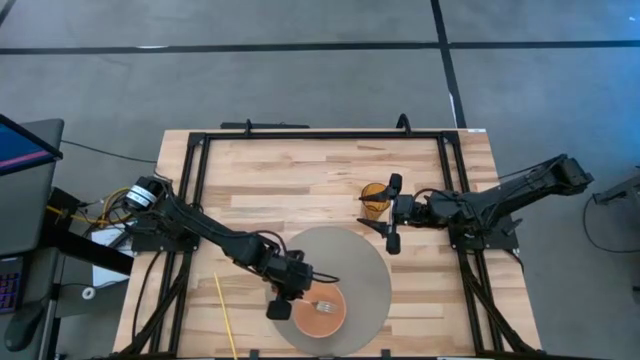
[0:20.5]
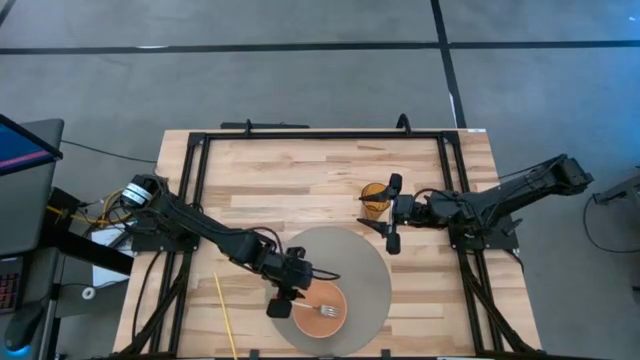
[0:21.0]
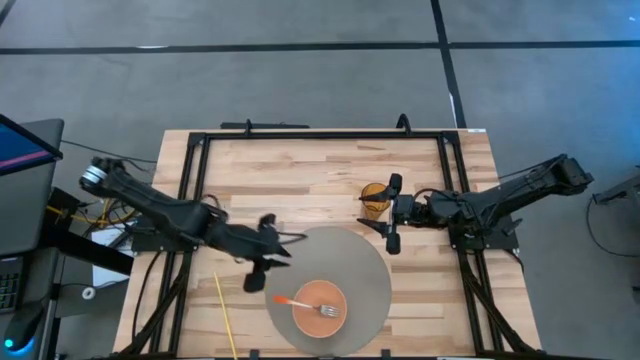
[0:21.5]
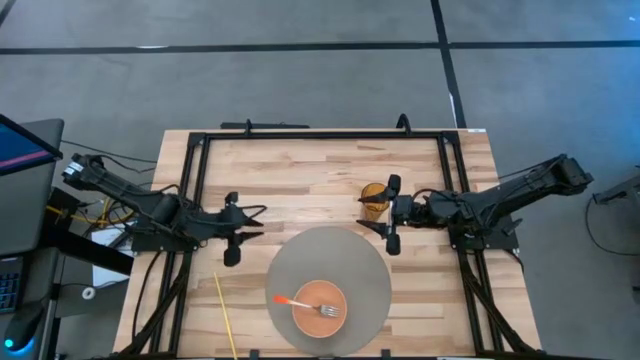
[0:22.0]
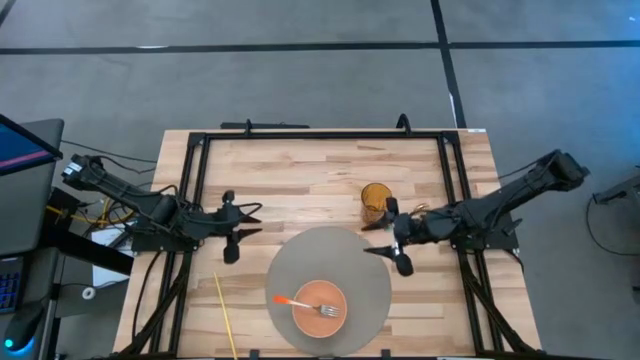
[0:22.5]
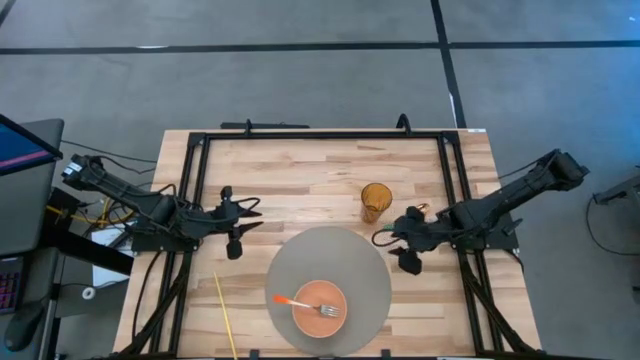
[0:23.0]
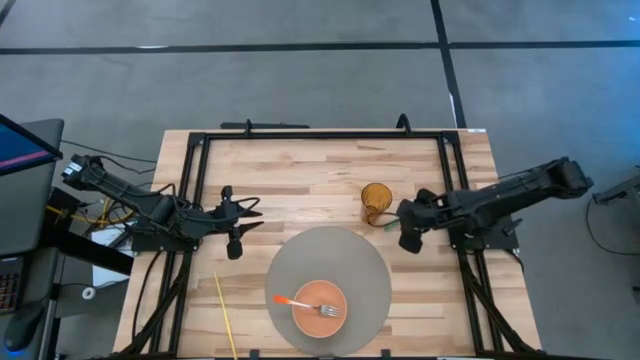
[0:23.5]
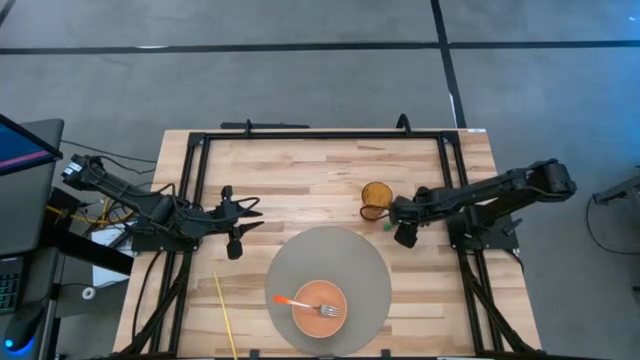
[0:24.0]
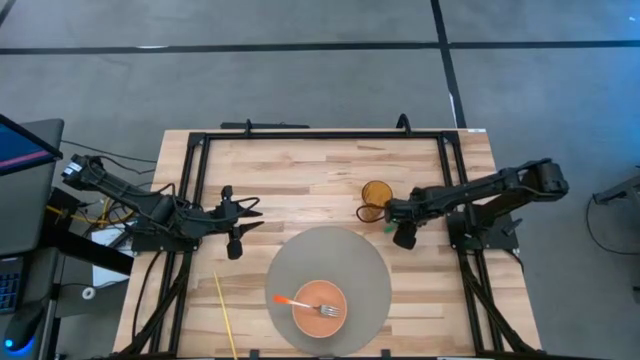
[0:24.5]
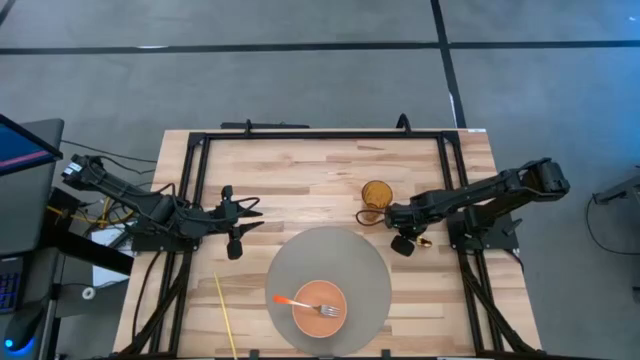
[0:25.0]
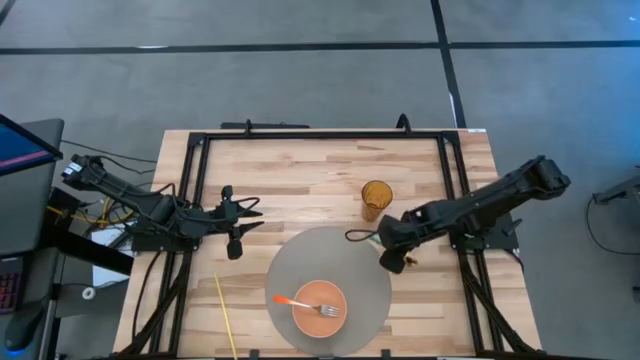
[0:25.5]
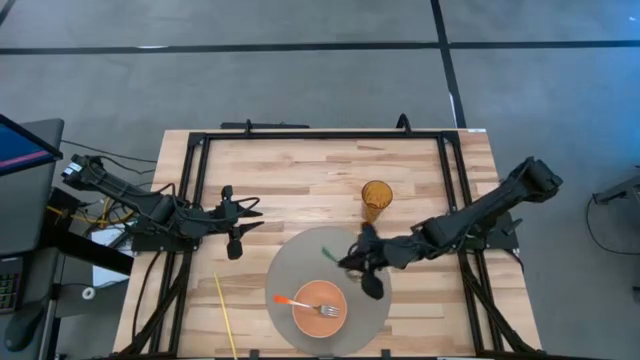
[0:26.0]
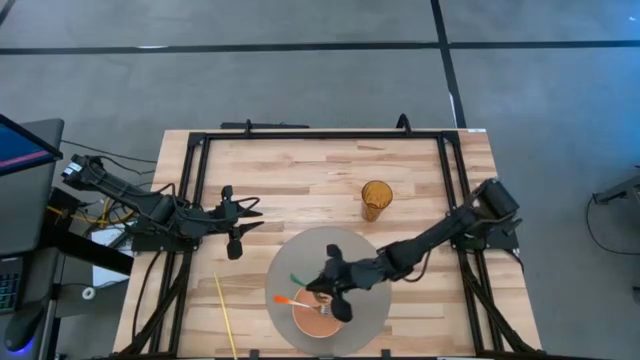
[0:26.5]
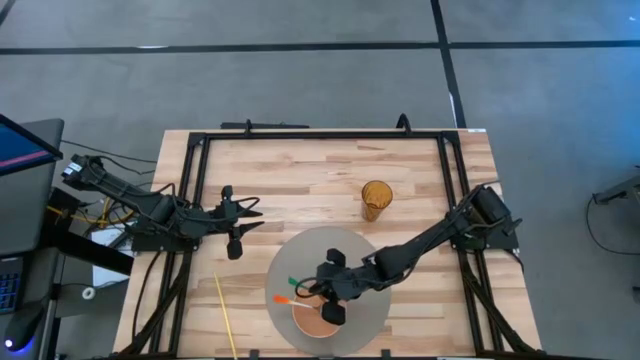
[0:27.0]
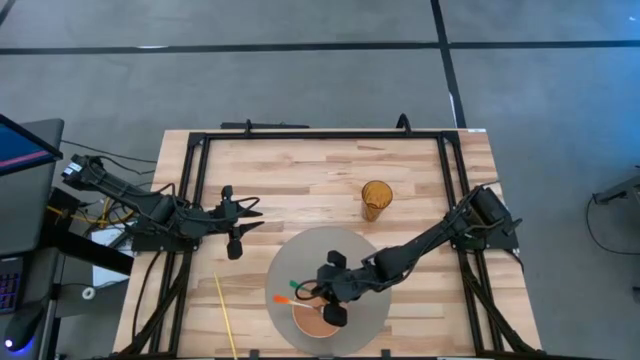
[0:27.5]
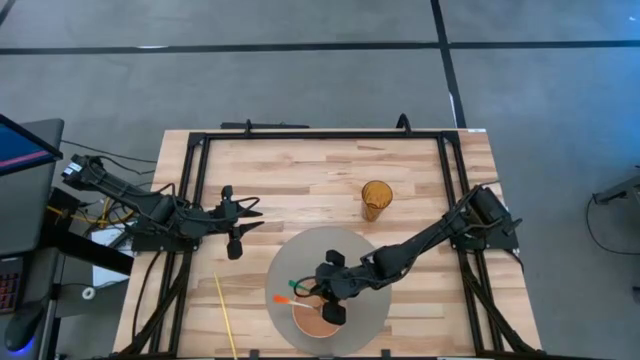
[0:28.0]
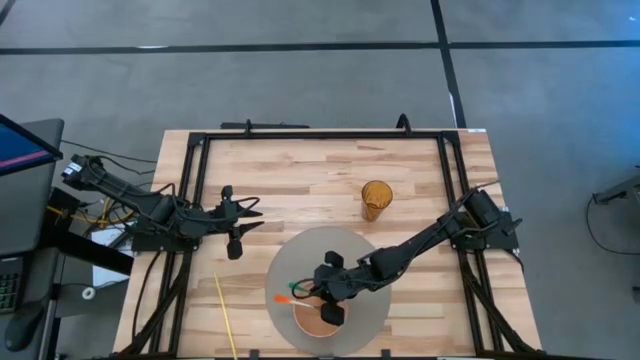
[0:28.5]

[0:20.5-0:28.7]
Task: Pick & Place Utensil
Put the green spoon into the orange bowl

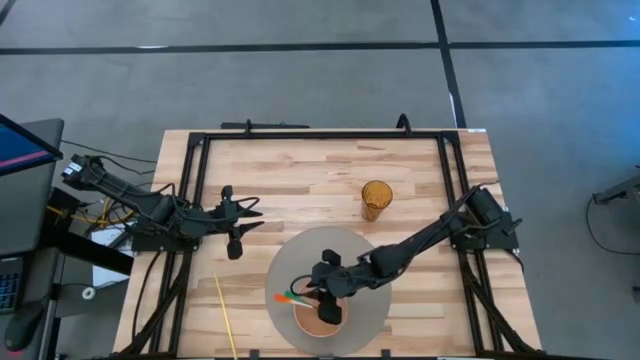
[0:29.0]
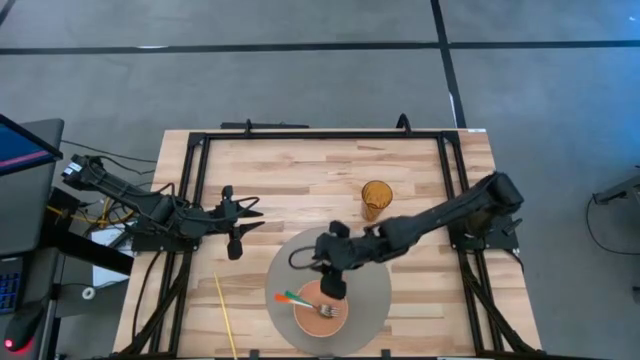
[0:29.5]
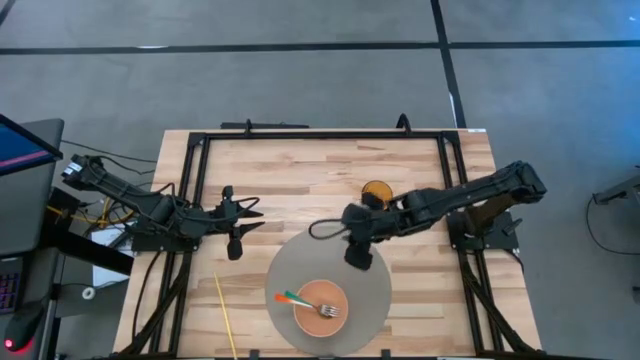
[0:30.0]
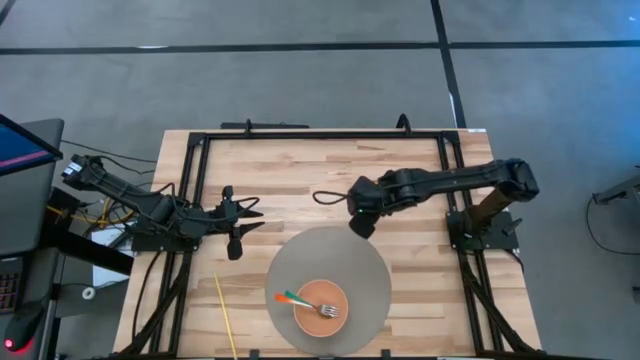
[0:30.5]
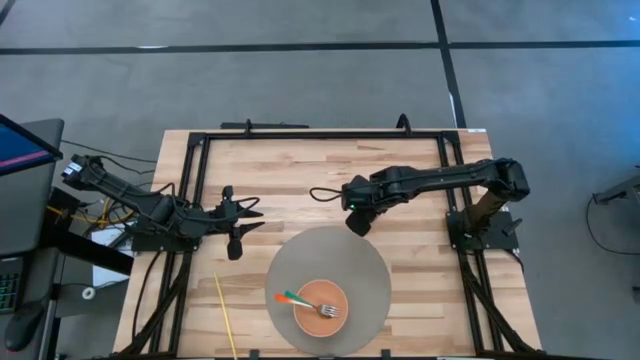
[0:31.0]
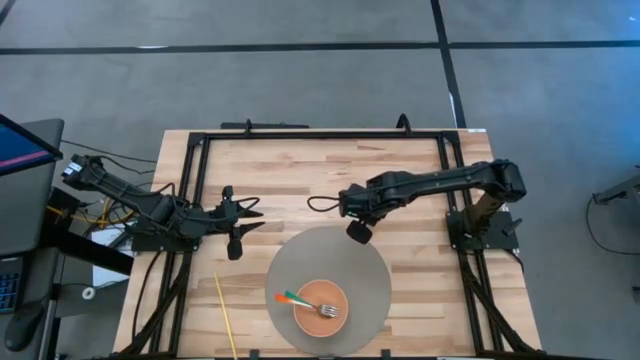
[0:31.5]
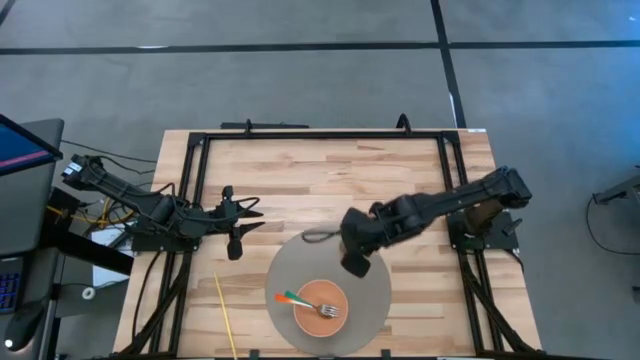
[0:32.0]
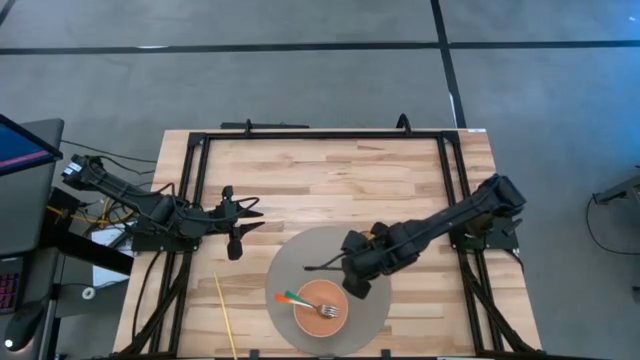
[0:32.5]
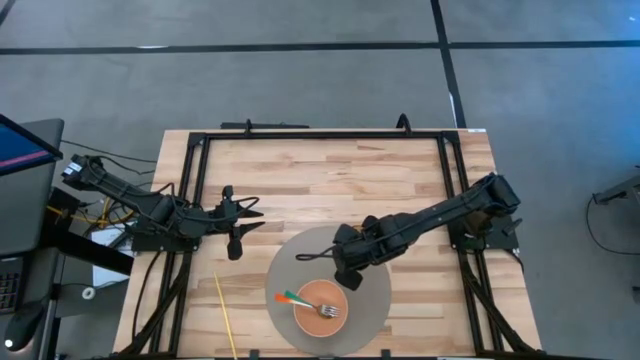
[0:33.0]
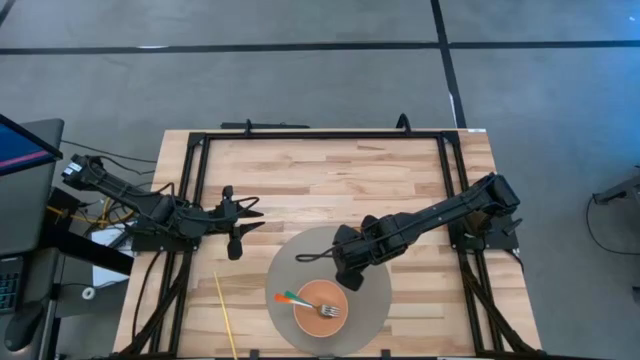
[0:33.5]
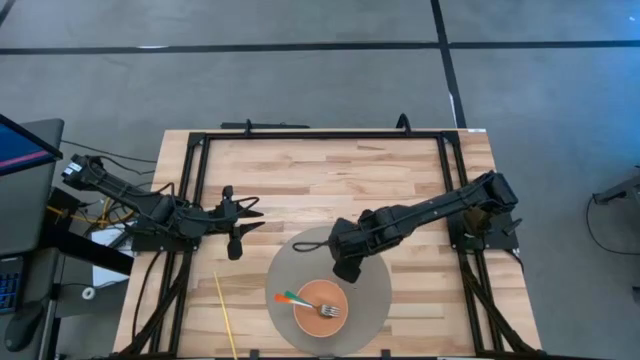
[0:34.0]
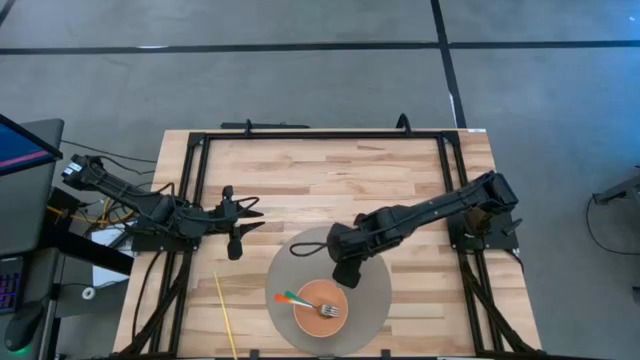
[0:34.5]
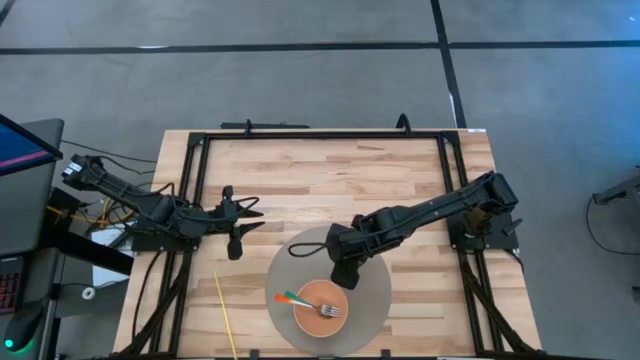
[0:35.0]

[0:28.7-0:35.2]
Put the brown cup on the gray mat on the top right of the orange bowl

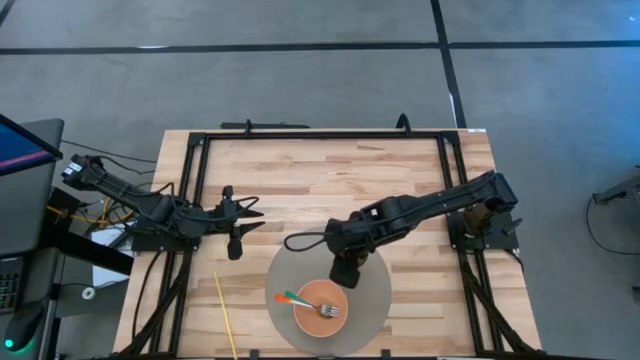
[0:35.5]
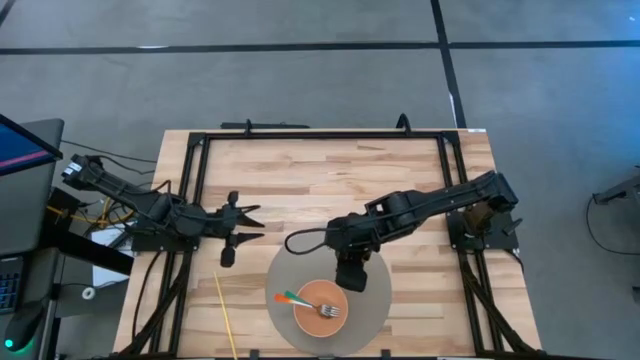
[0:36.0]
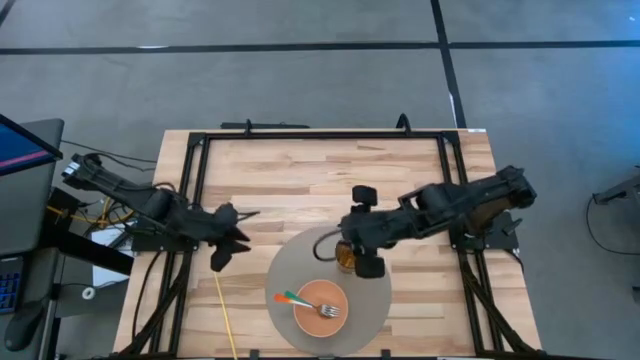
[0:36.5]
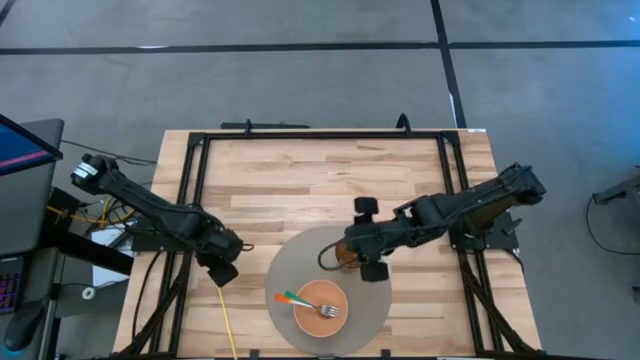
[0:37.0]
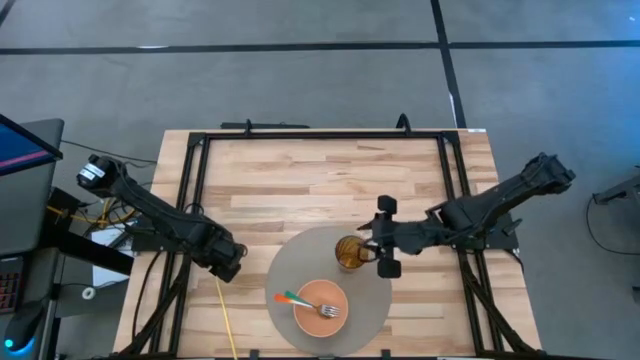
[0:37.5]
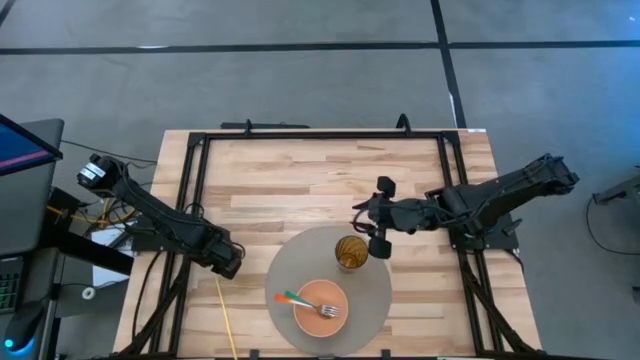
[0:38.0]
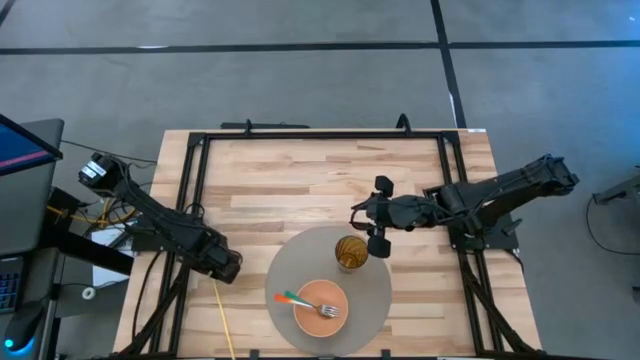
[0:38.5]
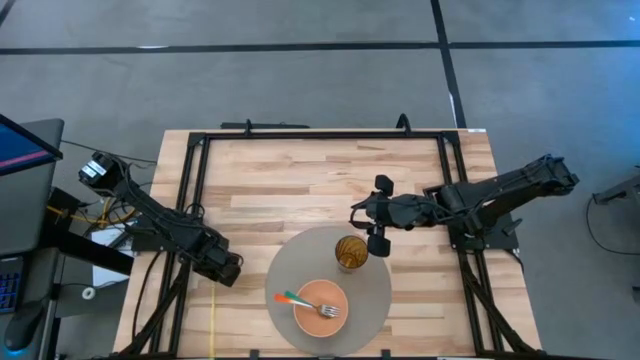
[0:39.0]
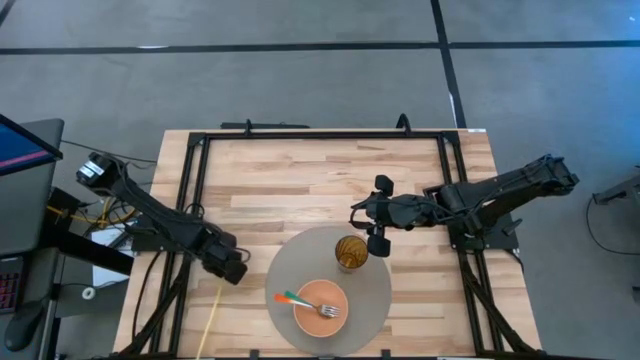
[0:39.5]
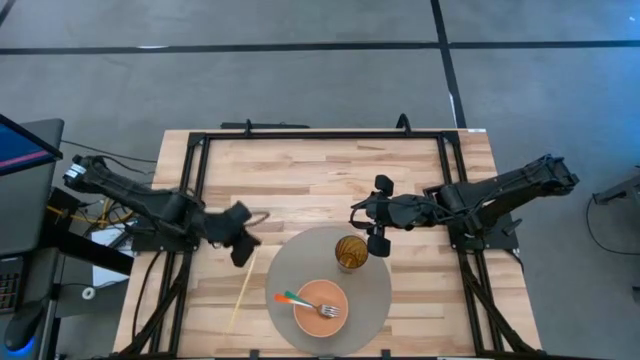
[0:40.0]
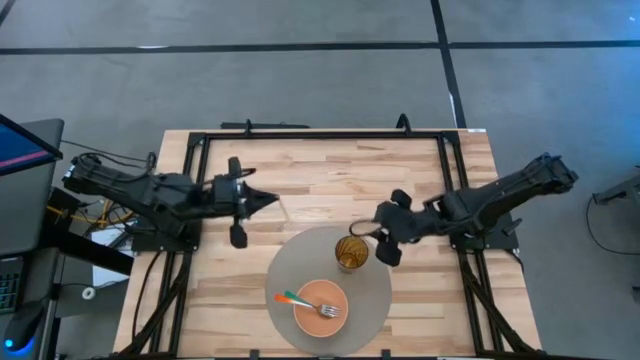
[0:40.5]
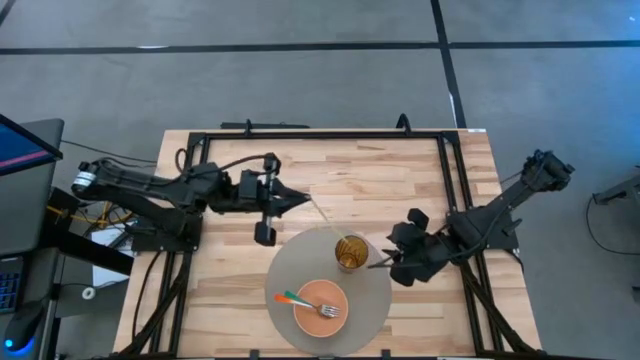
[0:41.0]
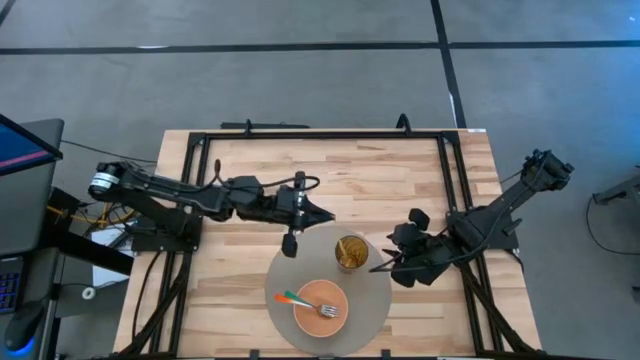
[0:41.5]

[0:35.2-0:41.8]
Put the yellow straw into the brown cup
